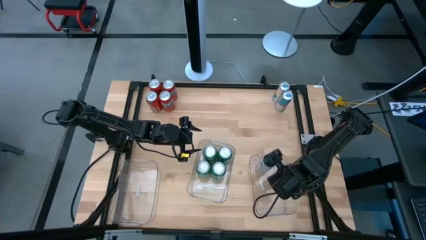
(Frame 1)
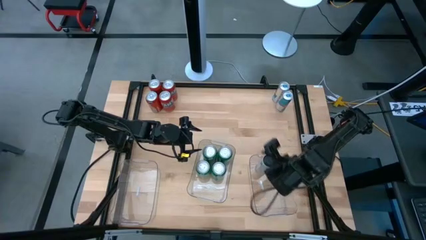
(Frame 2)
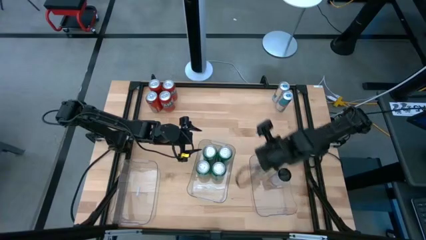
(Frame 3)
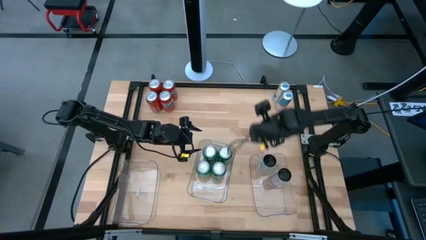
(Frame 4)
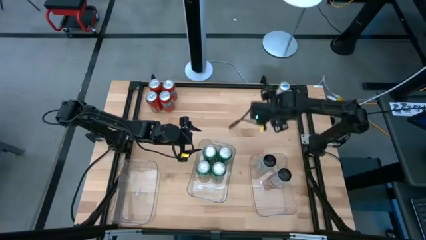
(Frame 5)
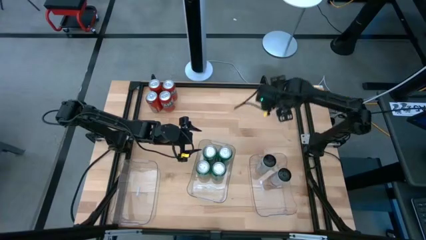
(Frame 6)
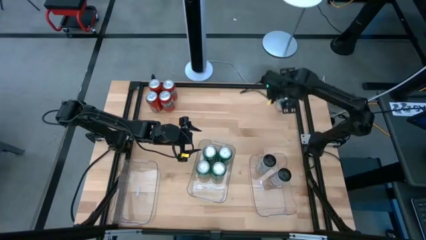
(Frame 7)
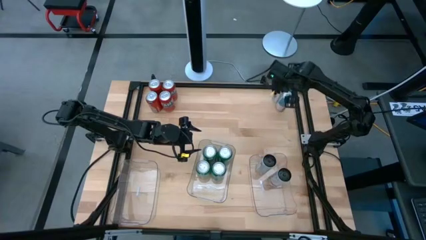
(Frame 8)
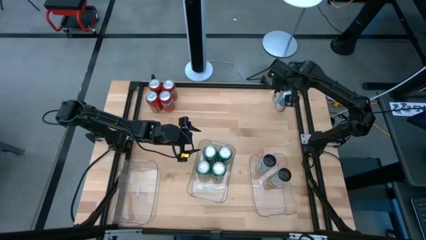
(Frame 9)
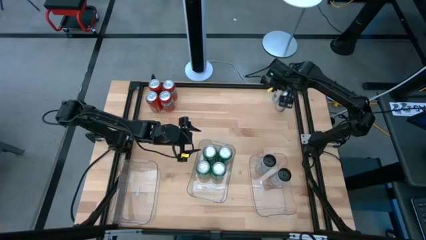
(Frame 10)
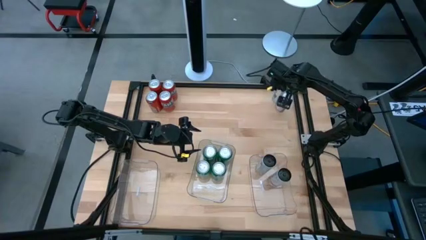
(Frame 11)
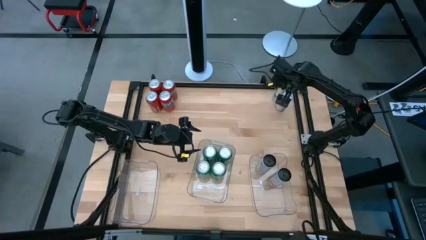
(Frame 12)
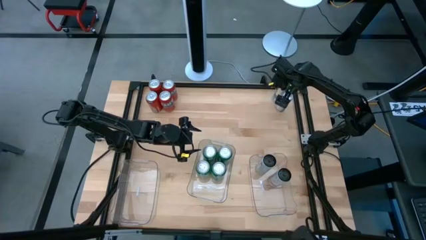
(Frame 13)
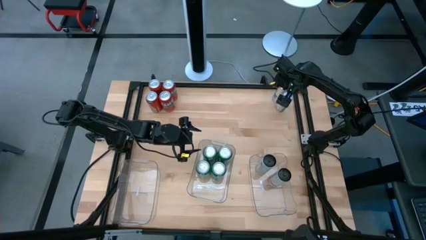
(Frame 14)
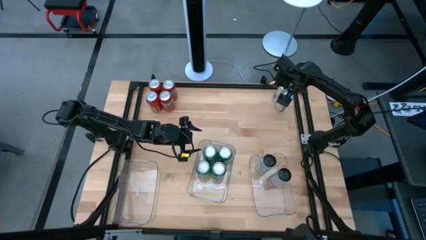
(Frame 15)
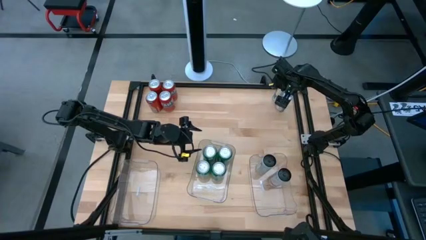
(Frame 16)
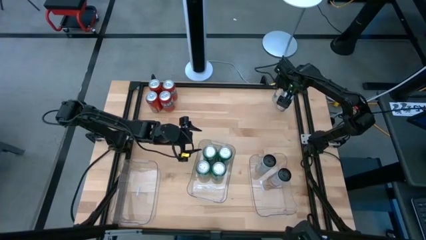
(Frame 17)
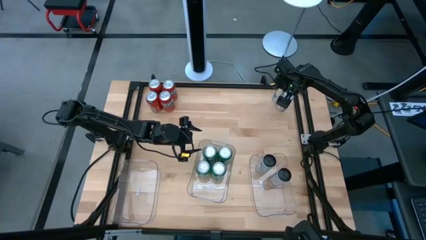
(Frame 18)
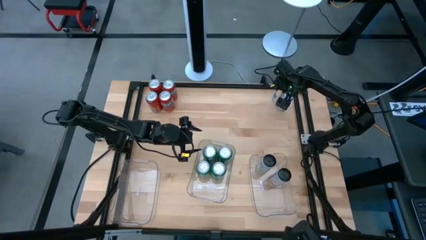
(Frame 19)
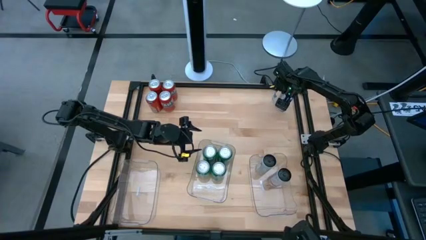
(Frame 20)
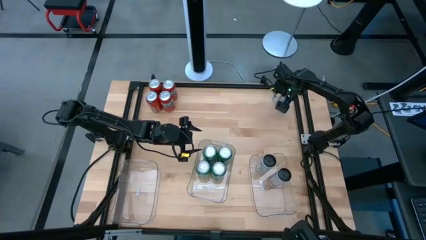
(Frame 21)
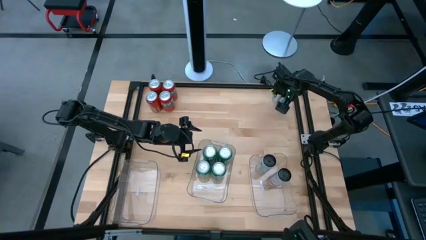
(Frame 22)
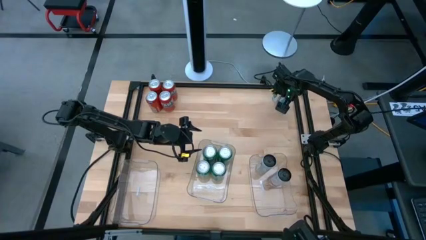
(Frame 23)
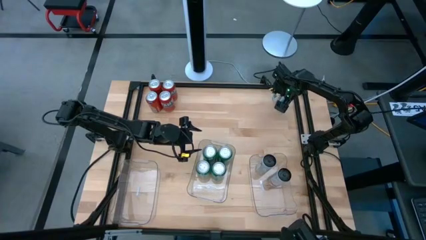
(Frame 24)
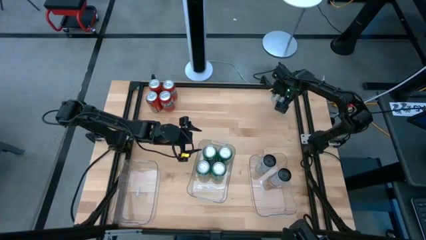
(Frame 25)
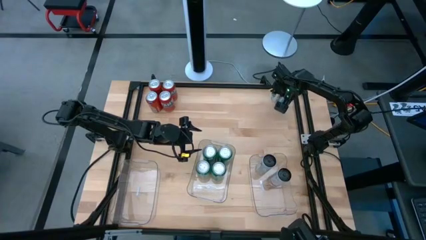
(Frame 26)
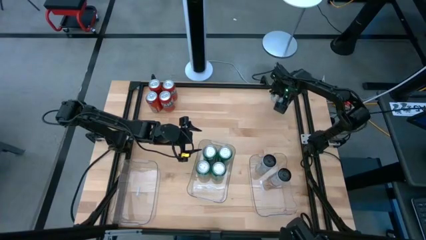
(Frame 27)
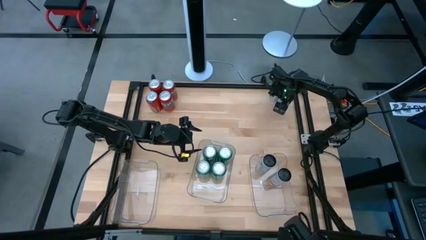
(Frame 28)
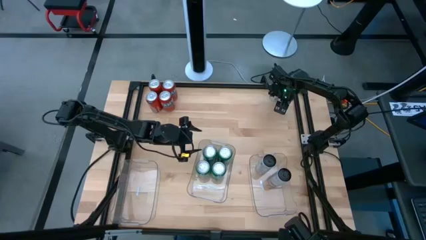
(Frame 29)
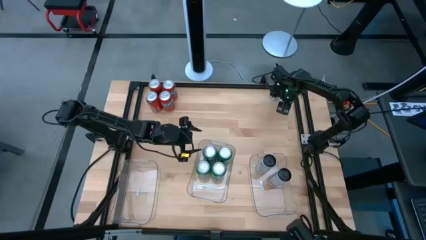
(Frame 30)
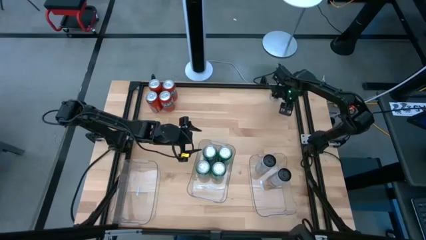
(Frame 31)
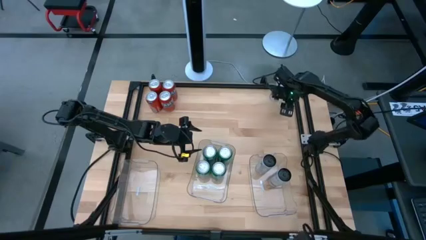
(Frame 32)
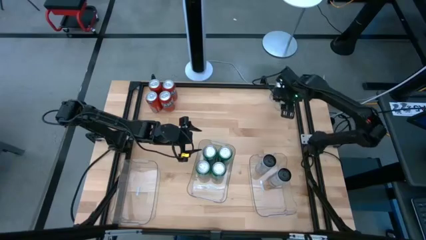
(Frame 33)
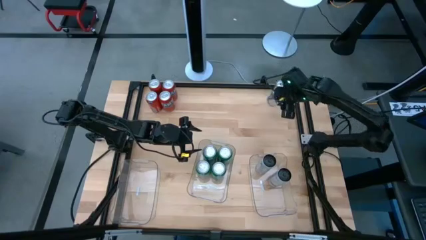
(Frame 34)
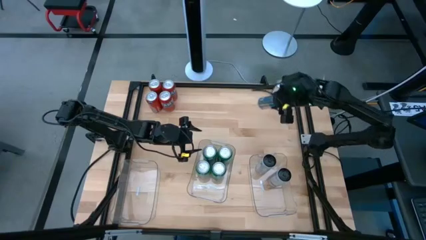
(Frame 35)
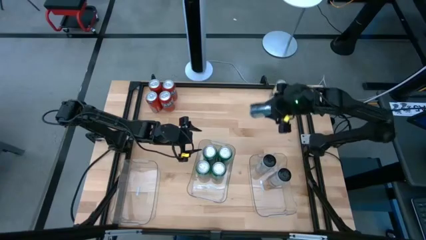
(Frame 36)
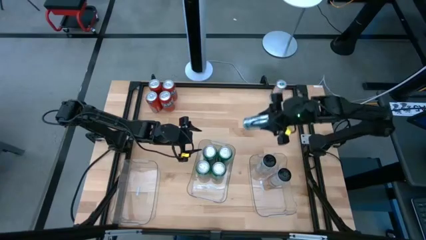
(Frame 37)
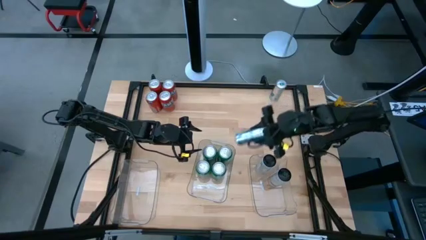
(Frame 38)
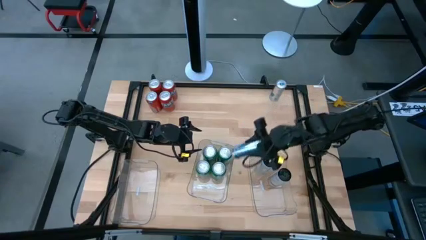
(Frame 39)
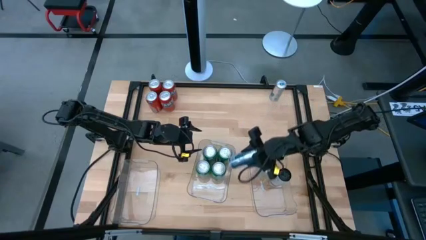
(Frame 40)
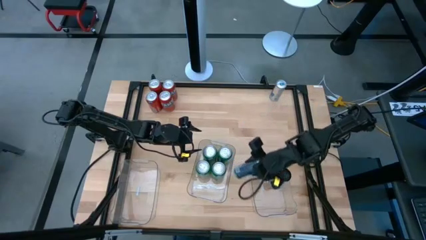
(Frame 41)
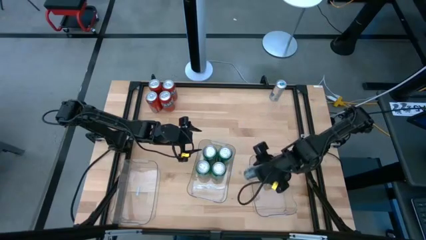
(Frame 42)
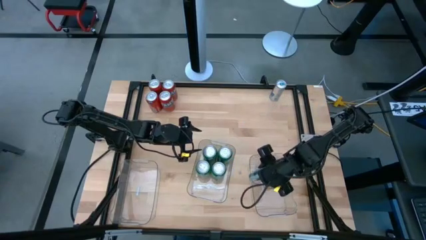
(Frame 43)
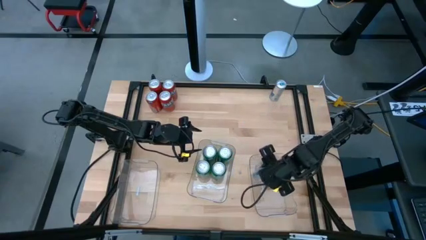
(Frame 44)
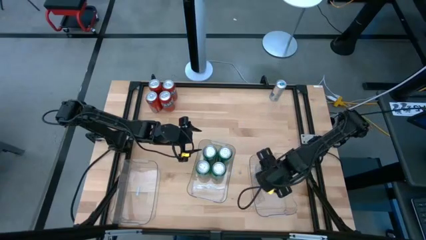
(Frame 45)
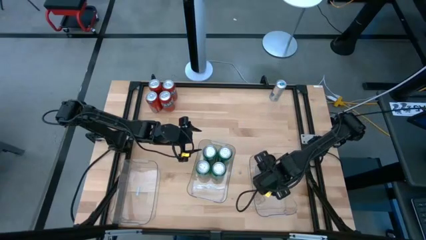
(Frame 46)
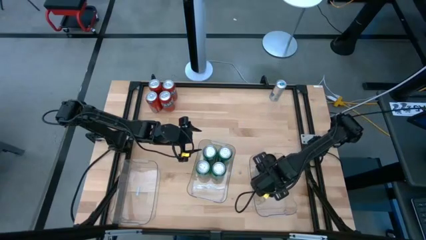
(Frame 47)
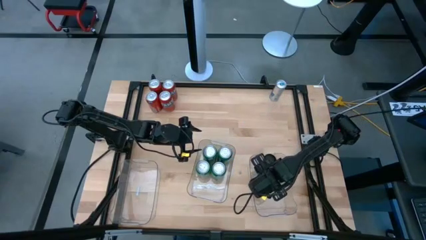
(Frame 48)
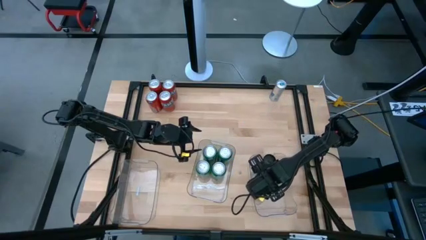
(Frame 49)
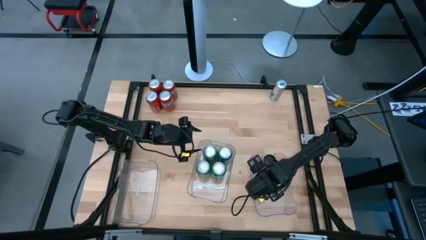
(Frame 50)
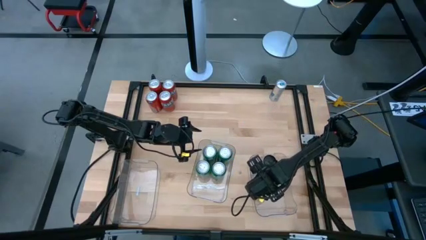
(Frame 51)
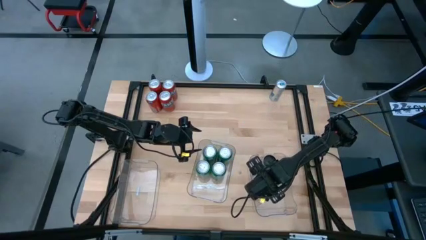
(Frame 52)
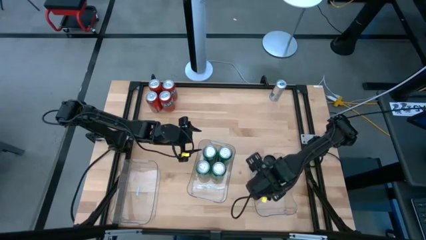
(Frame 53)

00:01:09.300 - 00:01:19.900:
Task: Sort soda cans
Put the blue soda can into the right transparent bin
